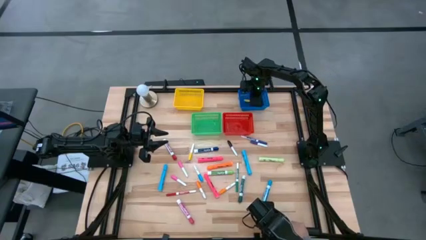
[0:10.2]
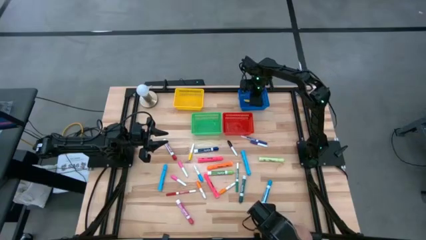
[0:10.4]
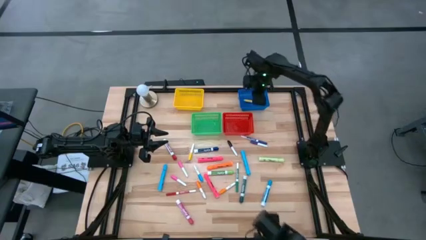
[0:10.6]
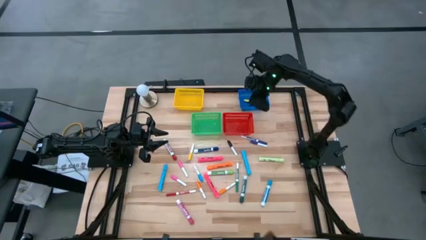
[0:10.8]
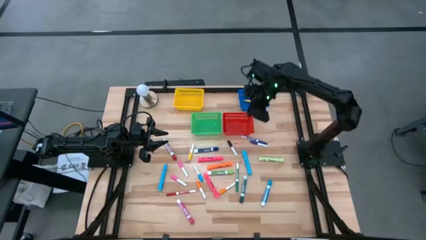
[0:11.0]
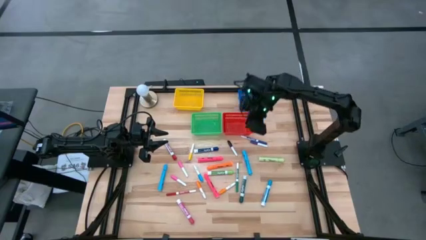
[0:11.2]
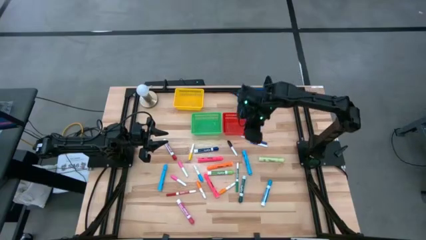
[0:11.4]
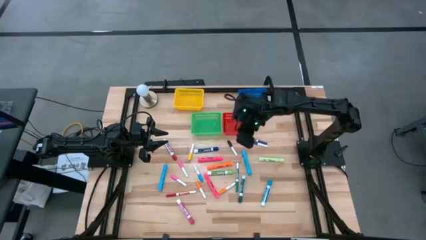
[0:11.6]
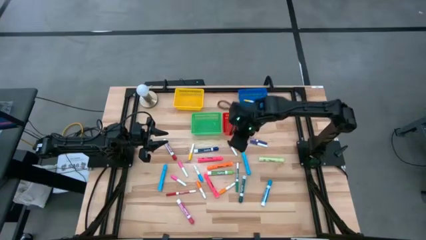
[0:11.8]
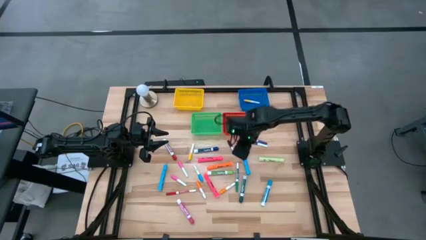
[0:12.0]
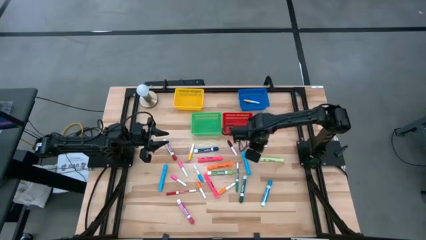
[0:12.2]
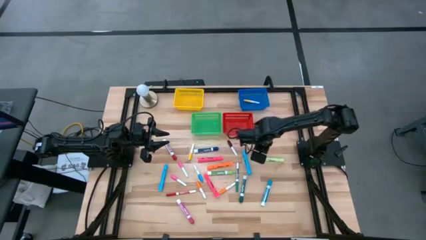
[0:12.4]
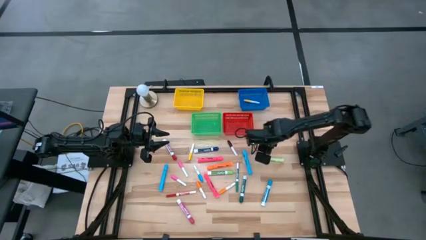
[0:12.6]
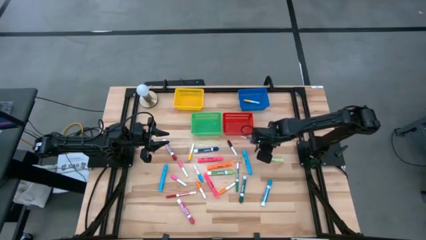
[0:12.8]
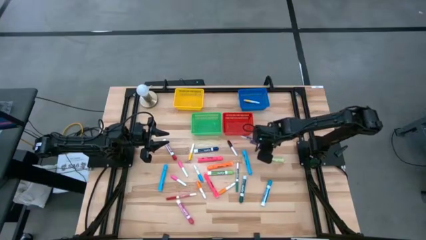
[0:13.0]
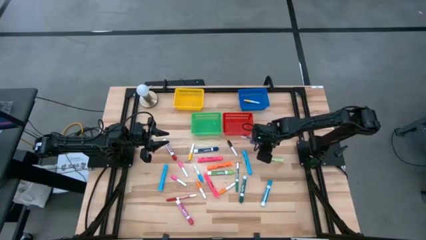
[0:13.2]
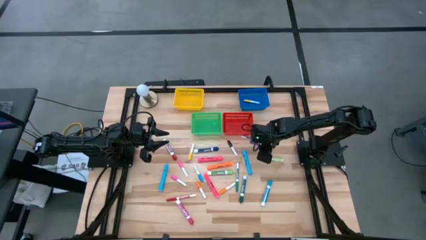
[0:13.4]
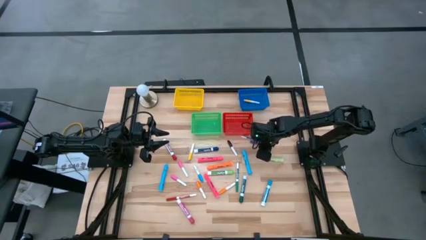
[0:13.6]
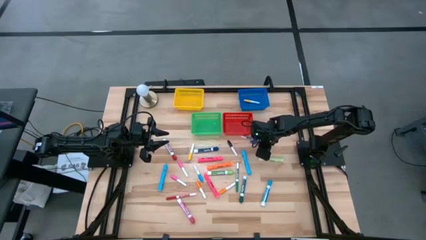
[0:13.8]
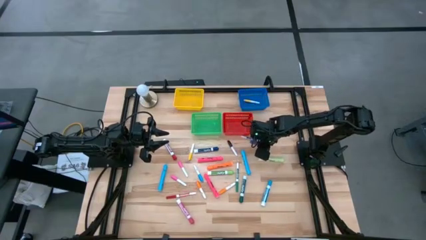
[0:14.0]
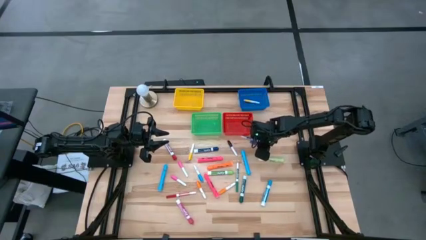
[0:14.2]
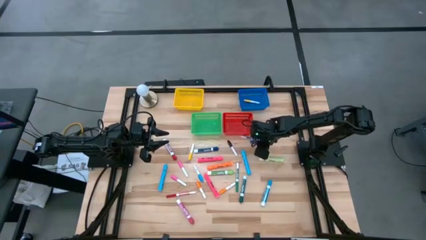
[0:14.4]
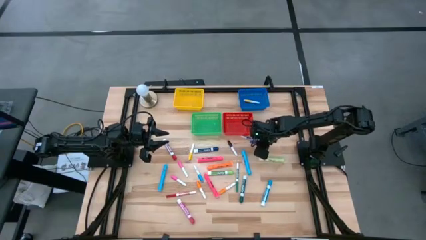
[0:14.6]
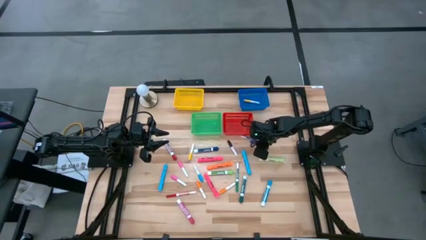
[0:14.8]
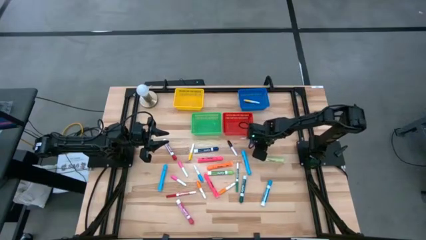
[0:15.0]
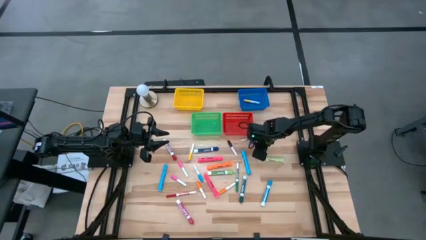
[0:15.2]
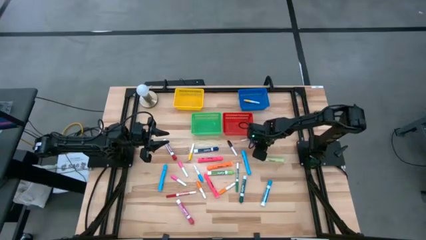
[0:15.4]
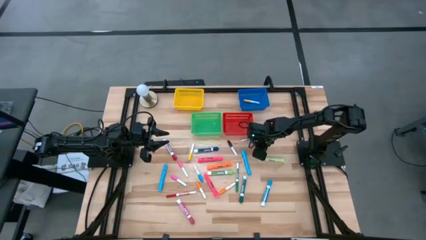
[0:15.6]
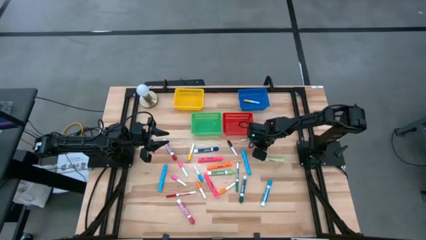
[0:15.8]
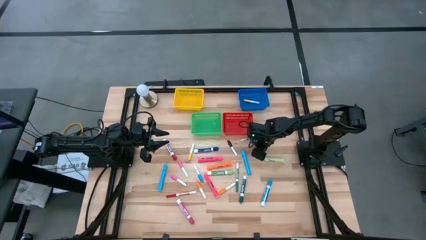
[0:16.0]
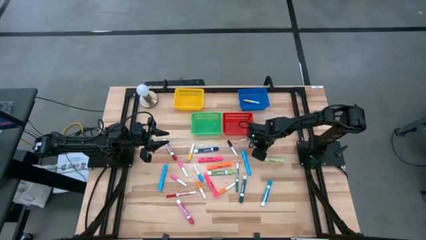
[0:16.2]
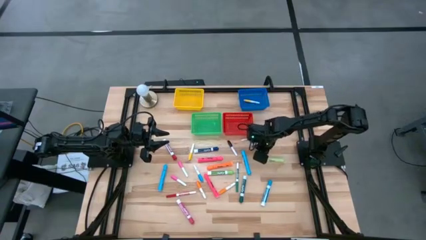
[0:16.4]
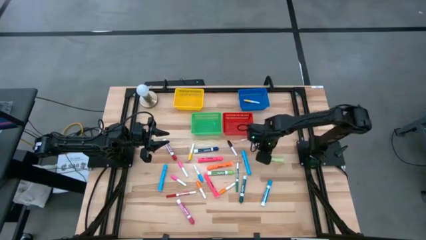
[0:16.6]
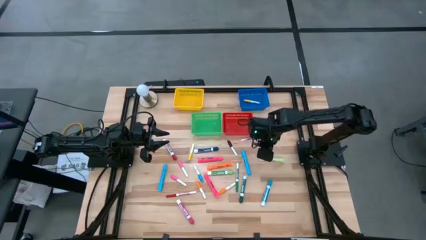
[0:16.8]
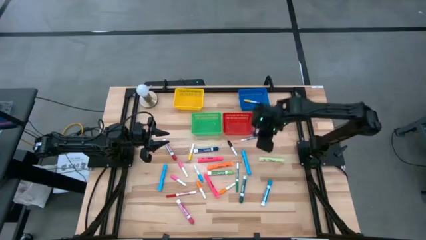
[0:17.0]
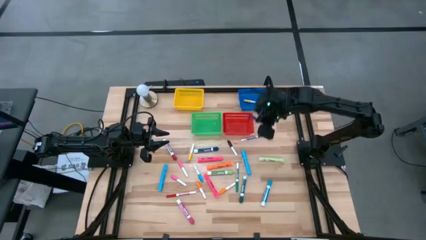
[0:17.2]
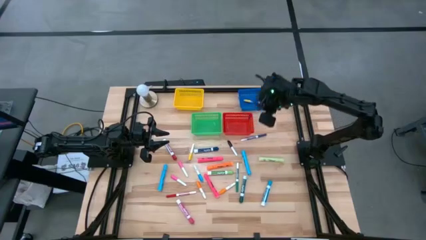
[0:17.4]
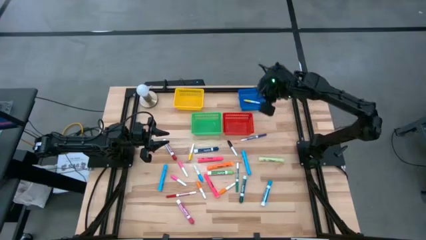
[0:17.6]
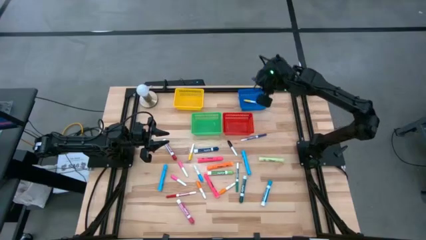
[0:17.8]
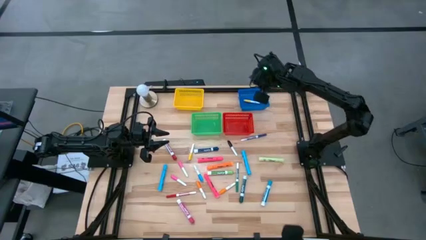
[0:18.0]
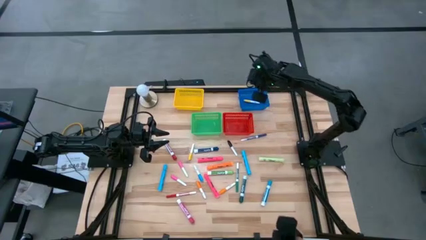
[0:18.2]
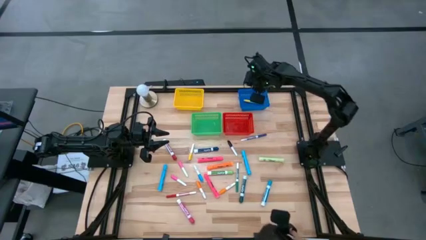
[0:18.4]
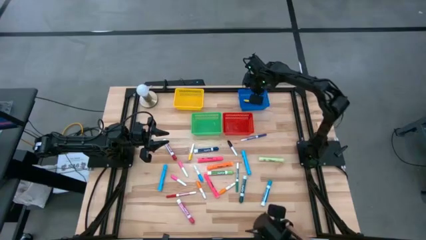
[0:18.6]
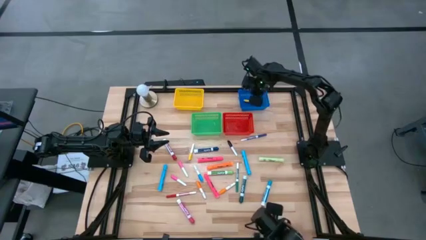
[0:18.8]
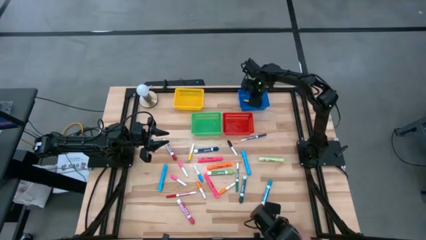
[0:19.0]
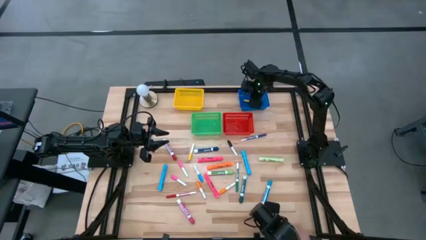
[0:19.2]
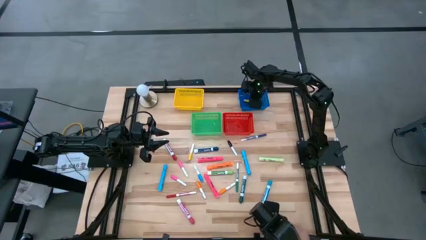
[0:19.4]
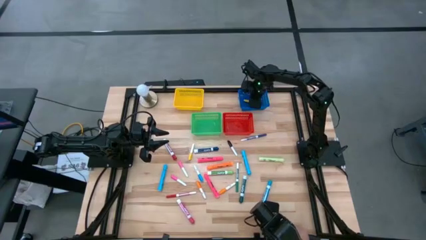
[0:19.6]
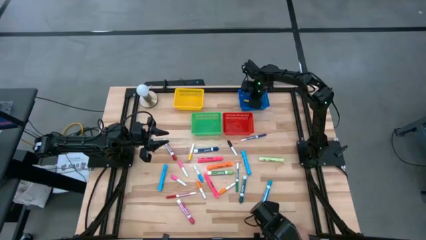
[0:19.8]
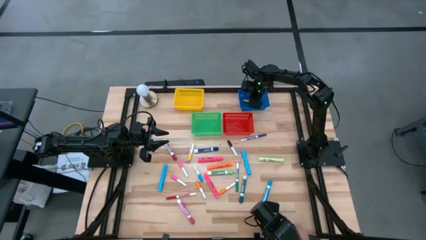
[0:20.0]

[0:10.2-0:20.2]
Task: Pick & Place Markers
Put the purple highlighter into the blue bin

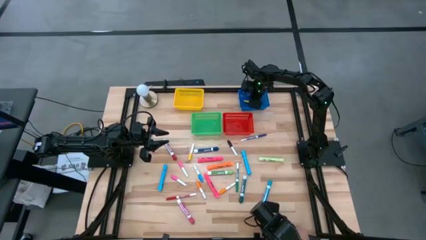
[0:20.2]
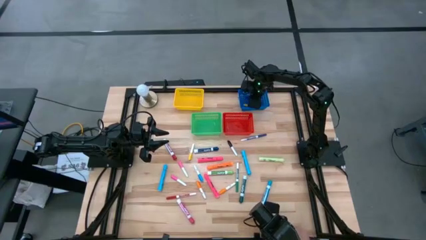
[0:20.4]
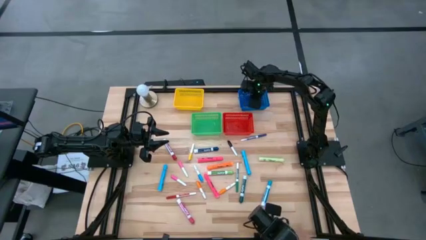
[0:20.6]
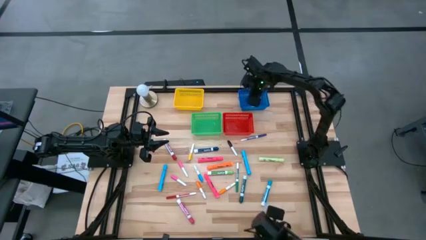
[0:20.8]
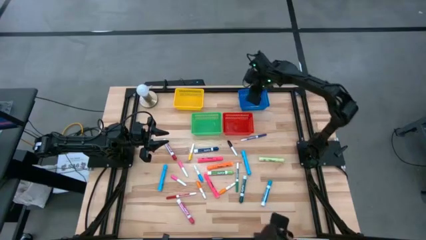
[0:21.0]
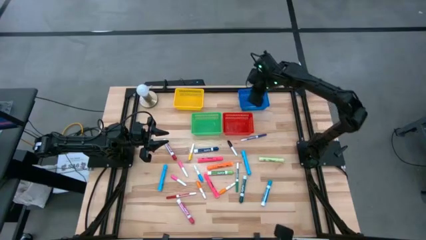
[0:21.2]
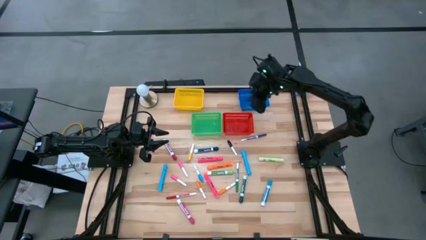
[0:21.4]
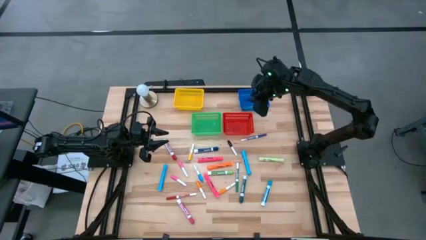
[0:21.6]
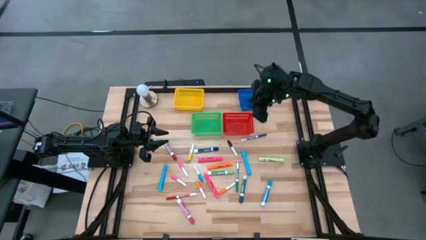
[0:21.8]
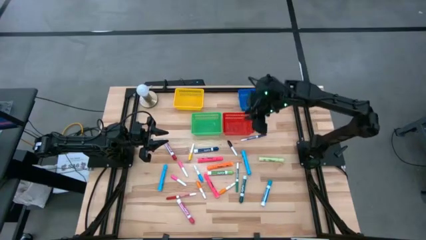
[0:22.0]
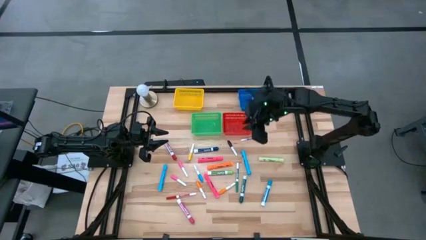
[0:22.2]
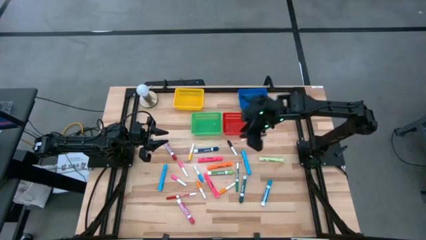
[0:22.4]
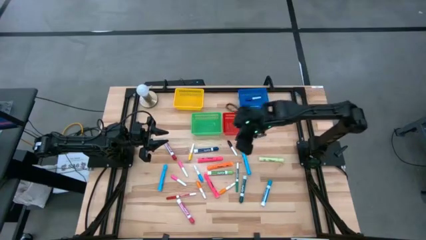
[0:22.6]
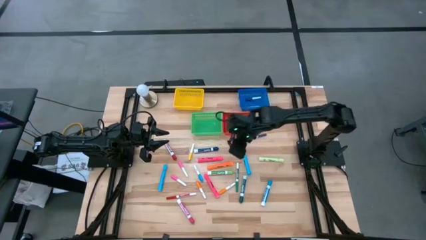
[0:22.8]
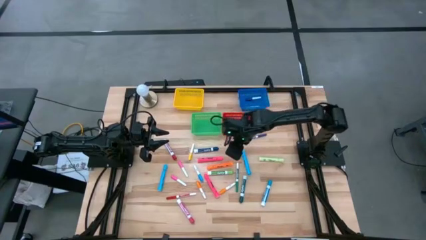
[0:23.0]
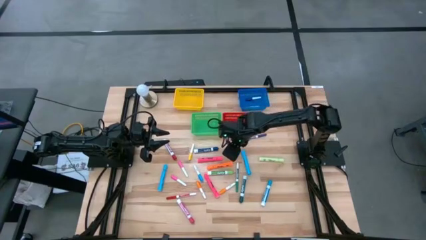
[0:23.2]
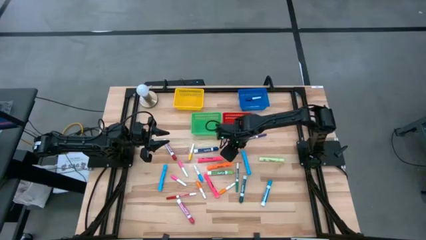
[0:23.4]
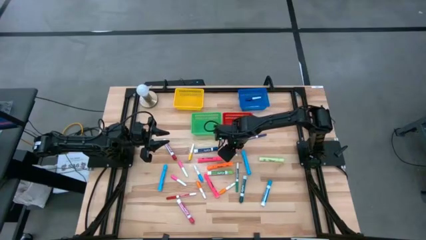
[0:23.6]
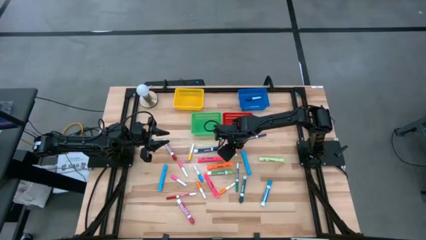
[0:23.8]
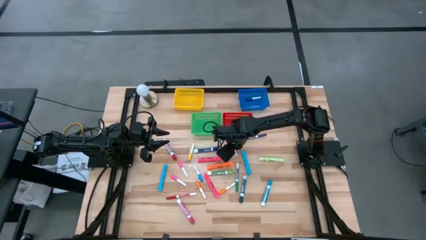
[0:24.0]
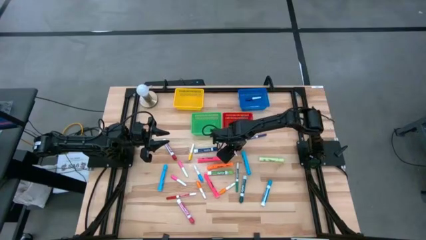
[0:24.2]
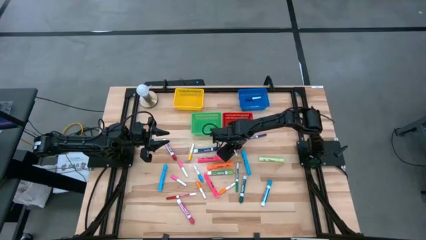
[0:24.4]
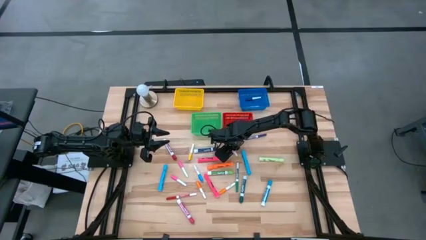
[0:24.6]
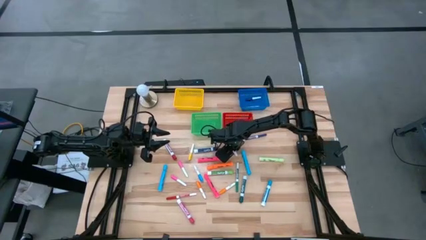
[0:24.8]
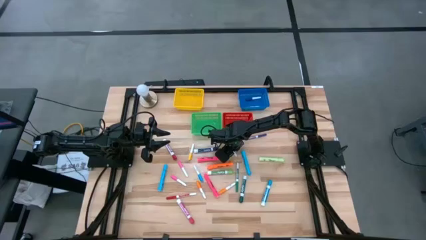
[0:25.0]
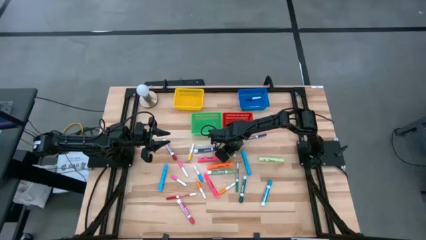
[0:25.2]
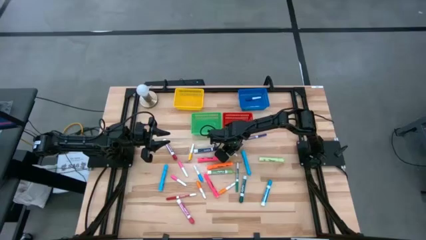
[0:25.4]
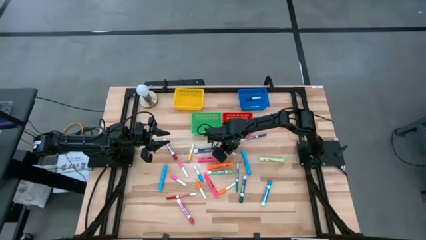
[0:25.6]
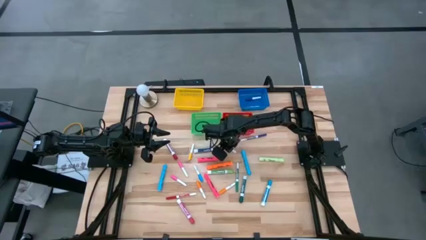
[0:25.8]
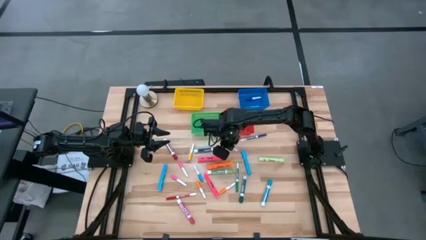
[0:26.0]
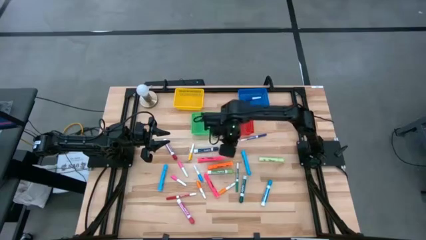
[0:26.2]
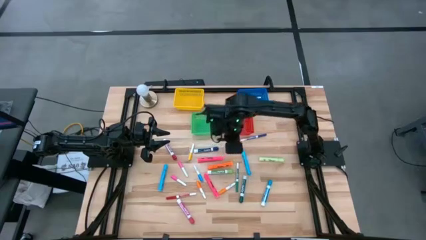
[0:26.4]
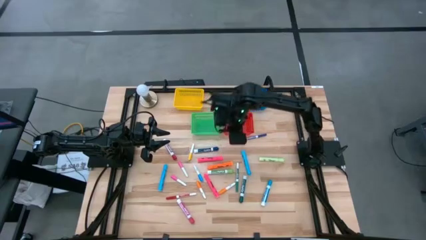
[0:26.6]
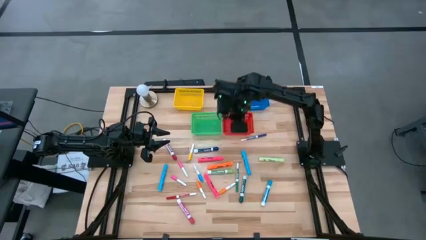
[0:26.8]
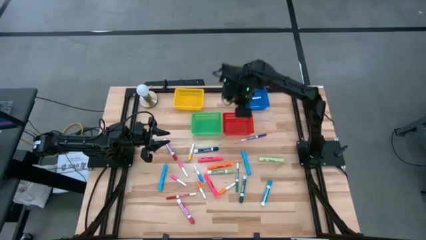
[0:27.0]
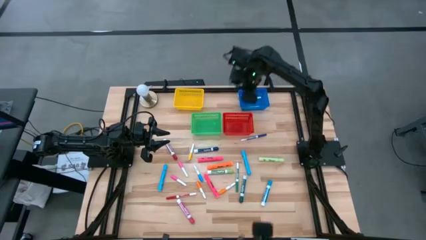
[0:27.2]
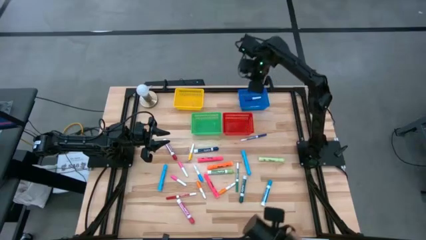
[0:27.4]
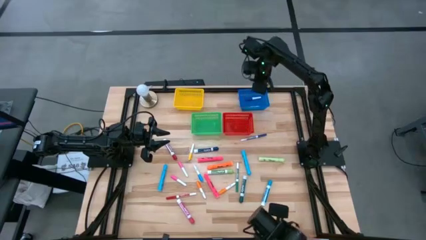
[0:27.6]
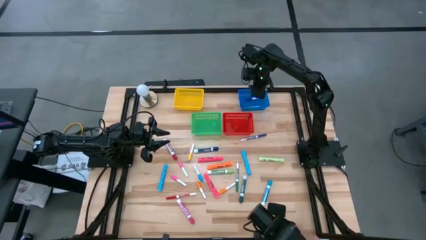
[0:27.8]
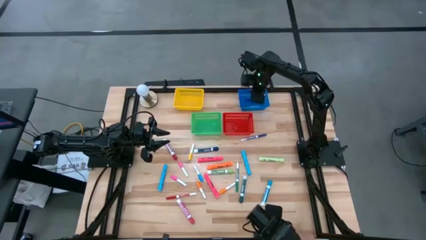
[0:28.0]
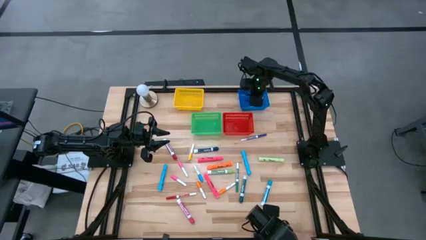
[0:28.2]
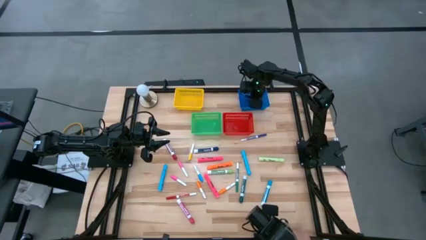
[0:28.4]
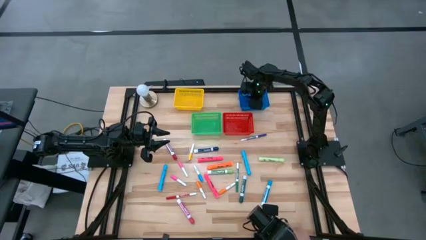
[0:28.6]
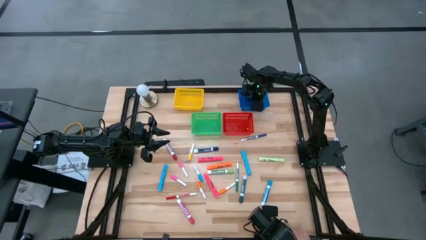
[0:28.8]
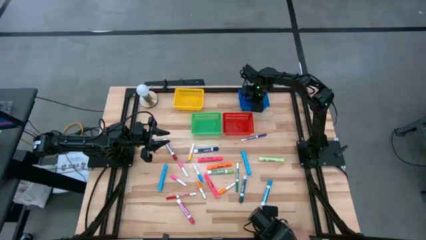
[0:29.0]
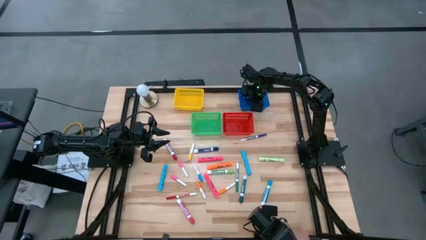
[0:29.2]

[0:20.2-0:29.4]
Put the black highlighter into the blue bin
